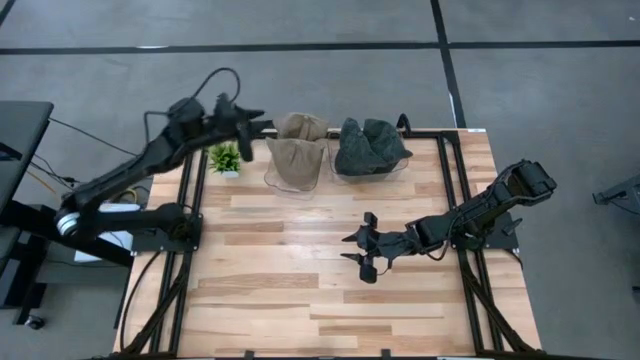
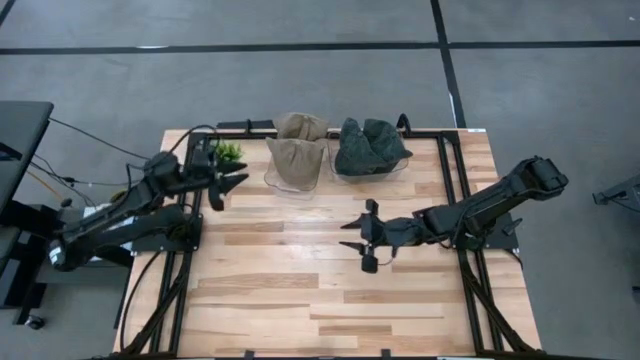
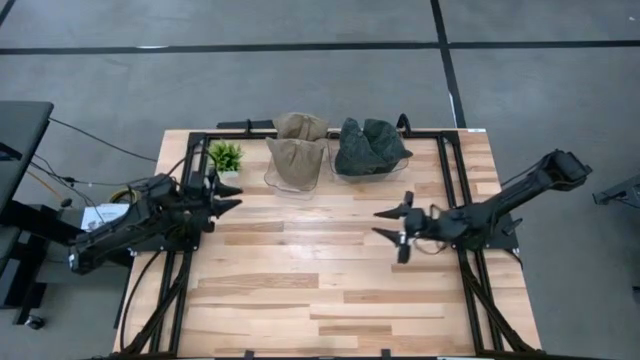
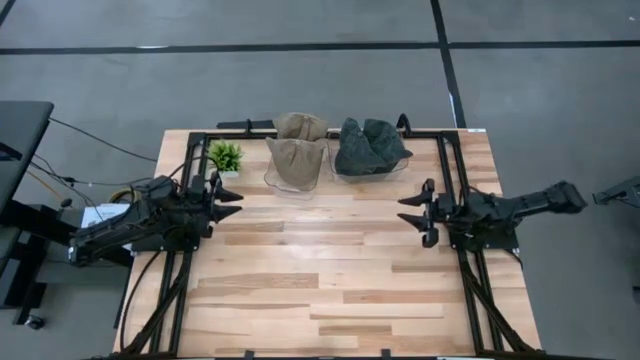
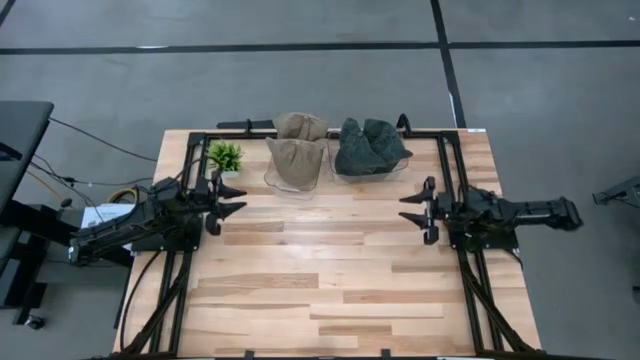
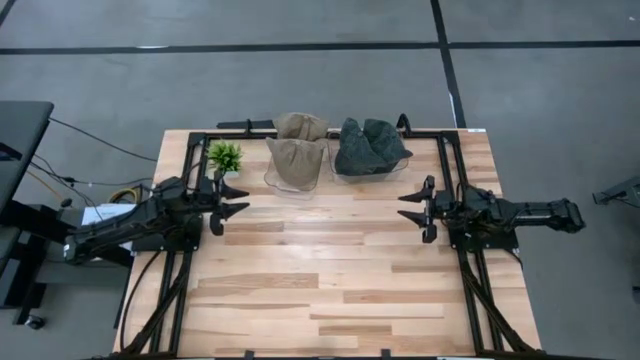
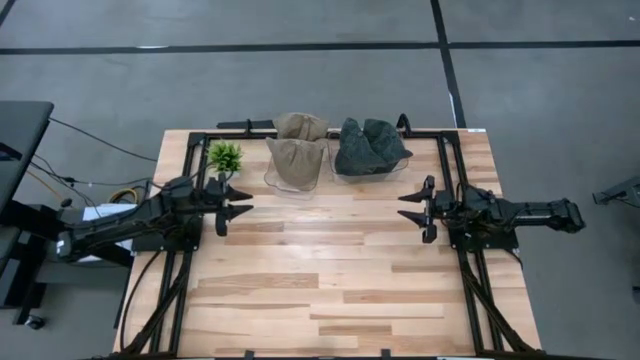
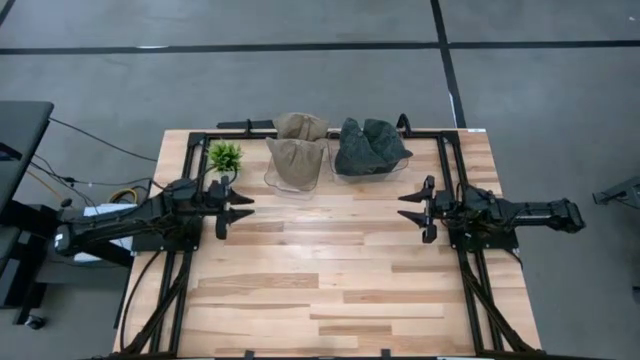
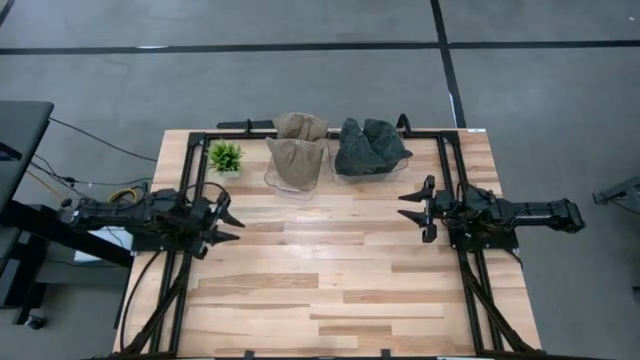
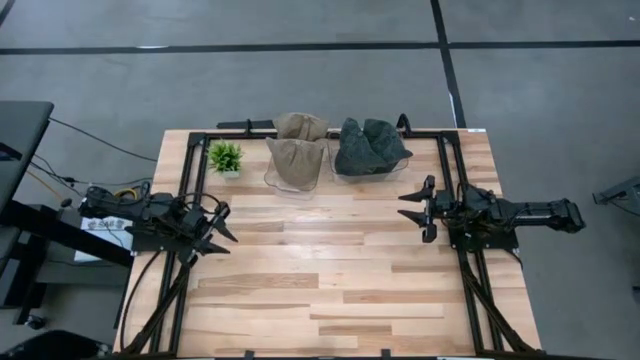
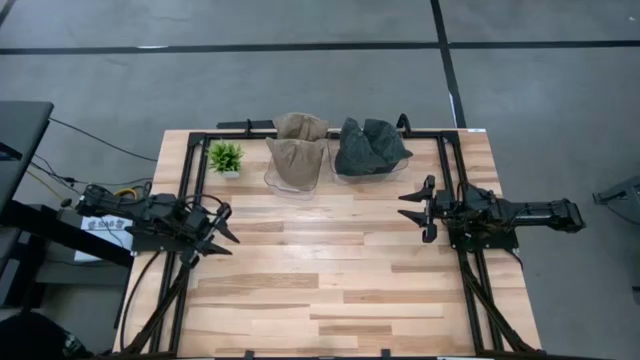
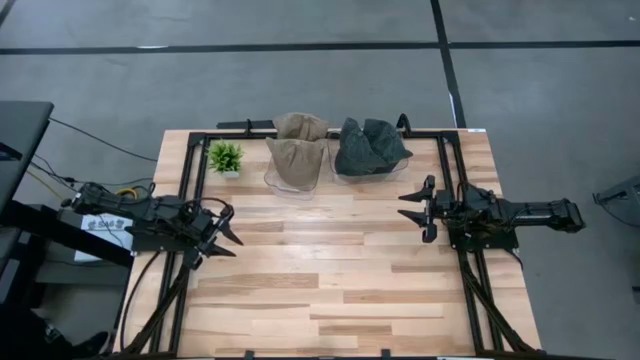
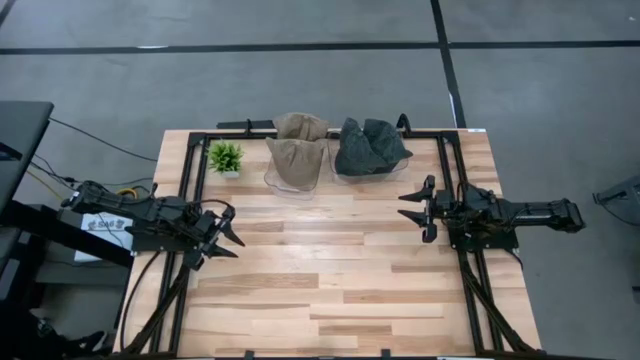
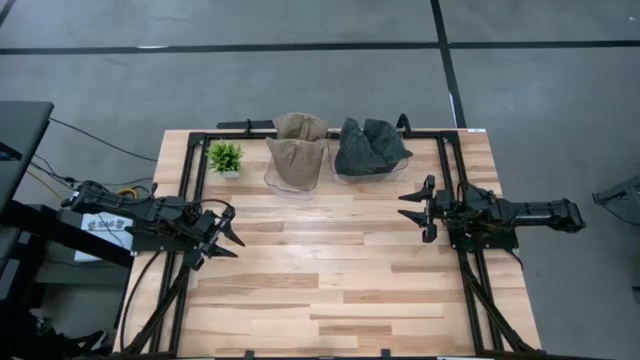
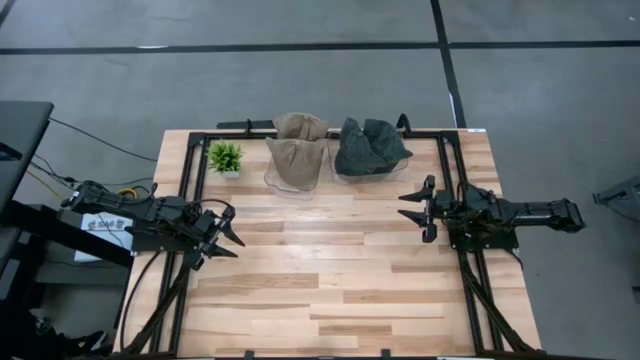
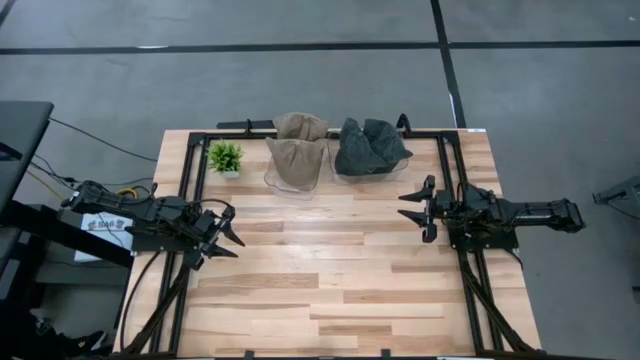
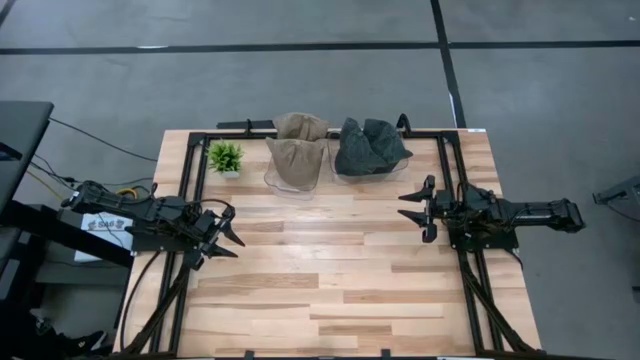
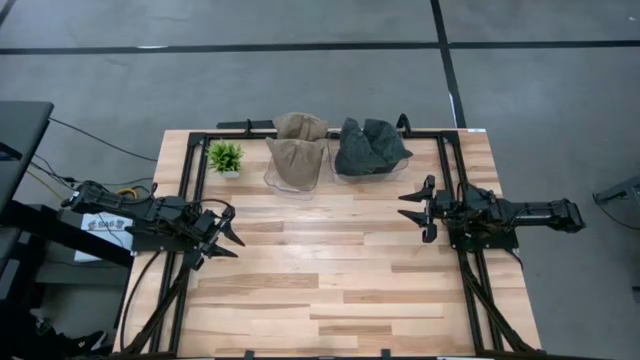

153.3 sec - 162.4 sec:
Task: Pick & Place hat
Return to Home Position

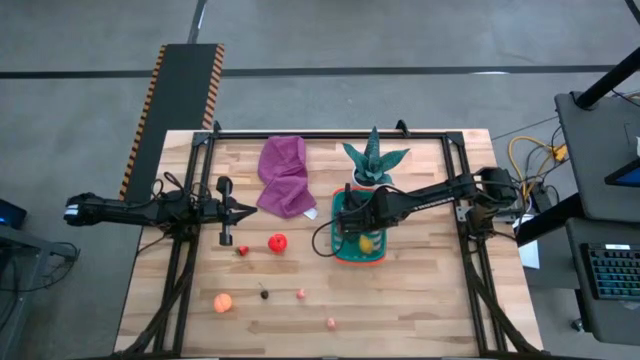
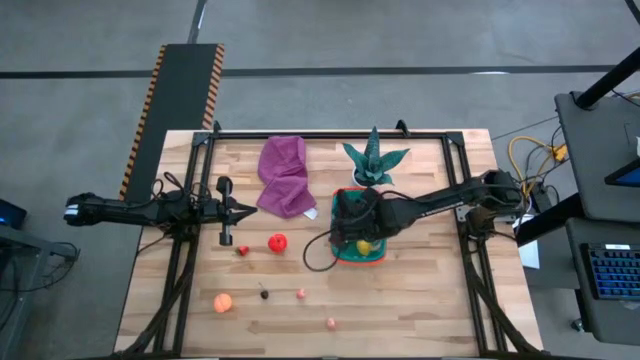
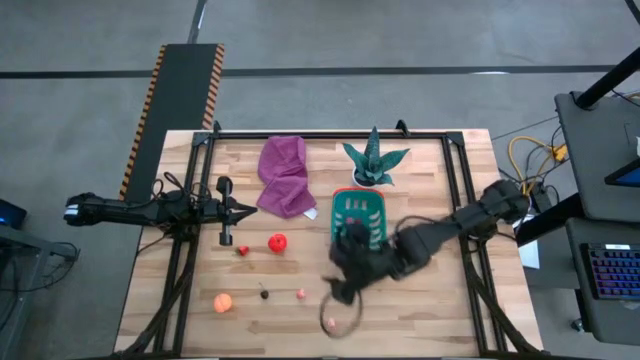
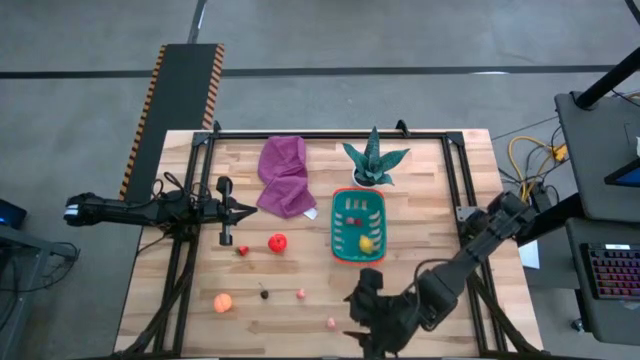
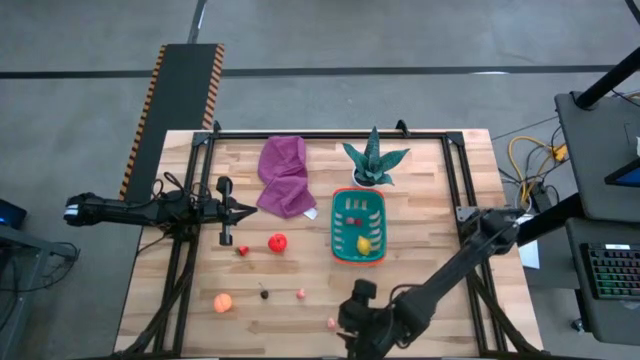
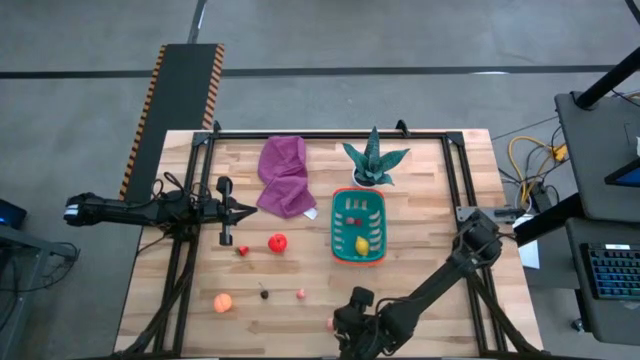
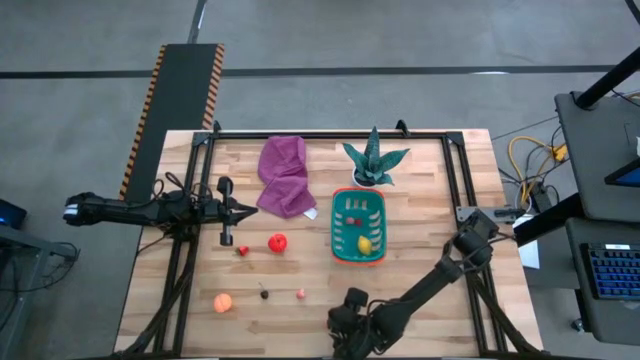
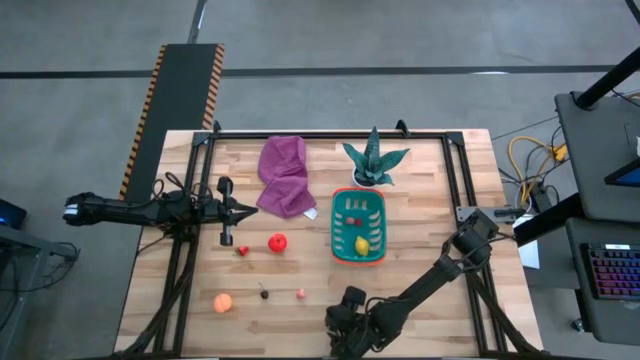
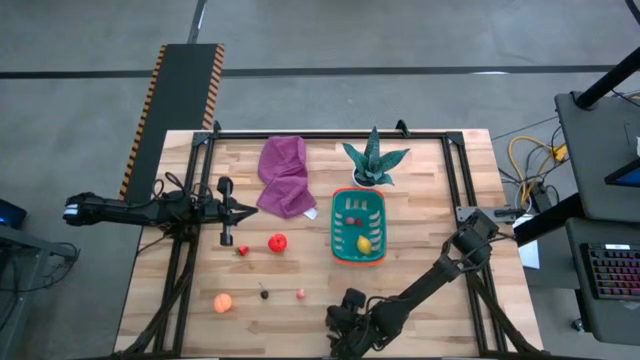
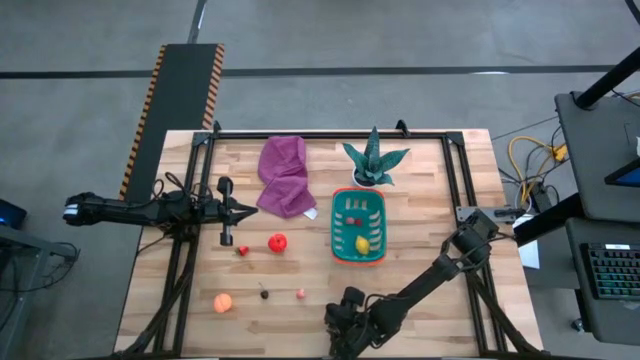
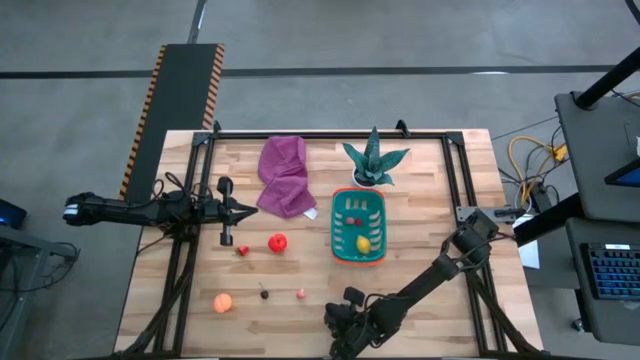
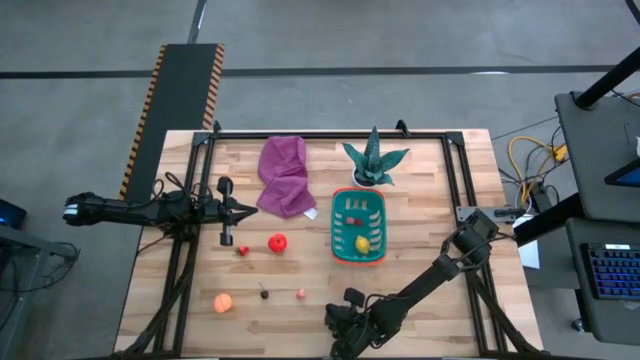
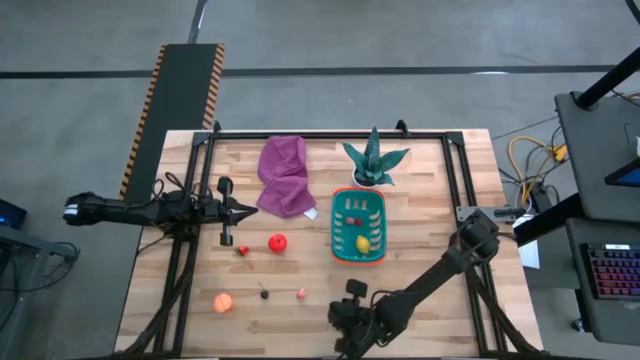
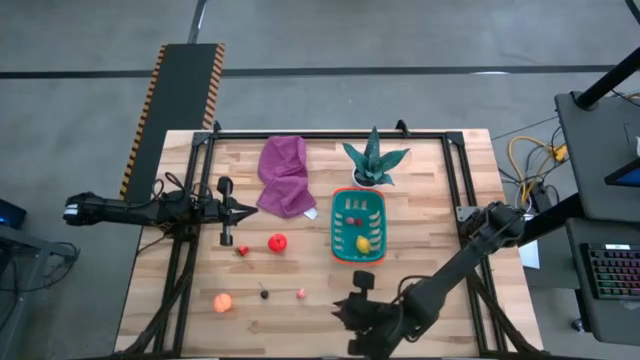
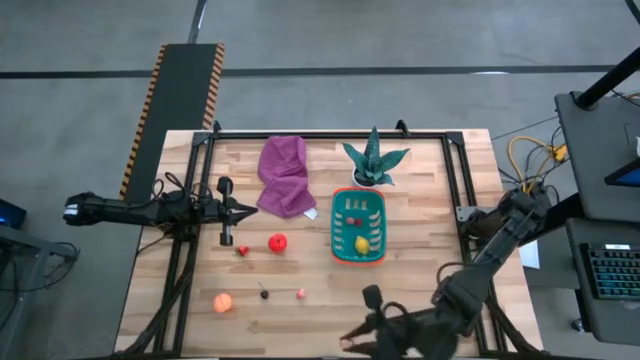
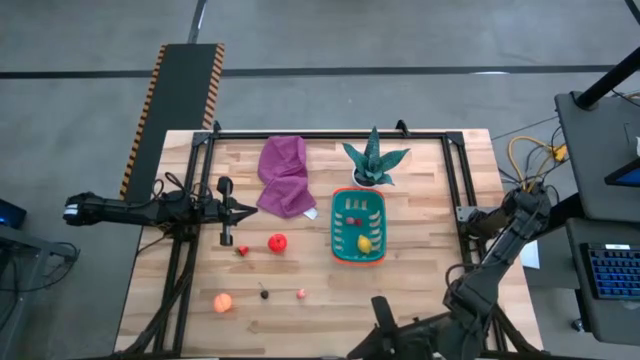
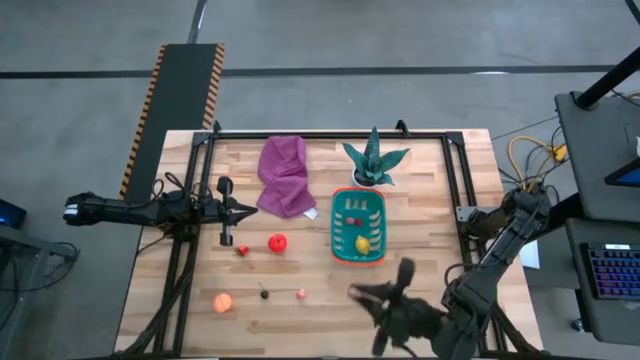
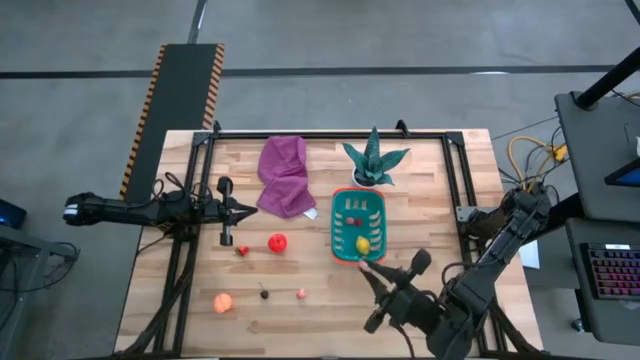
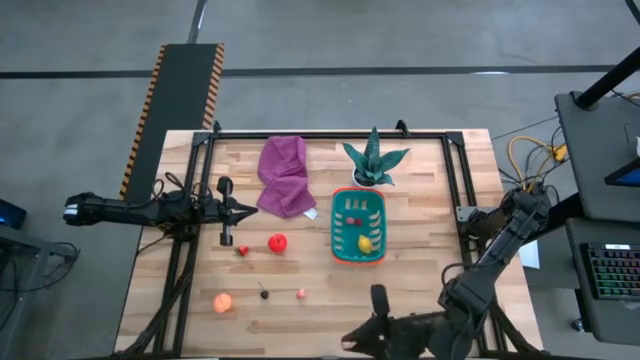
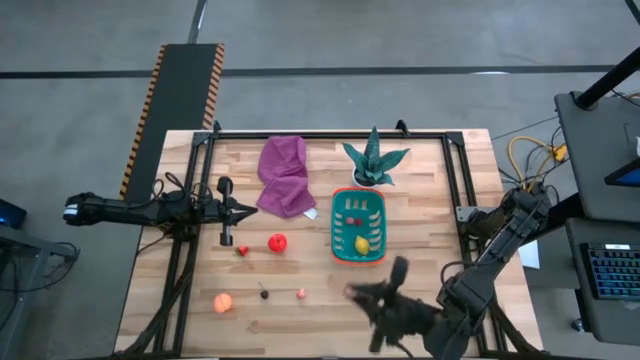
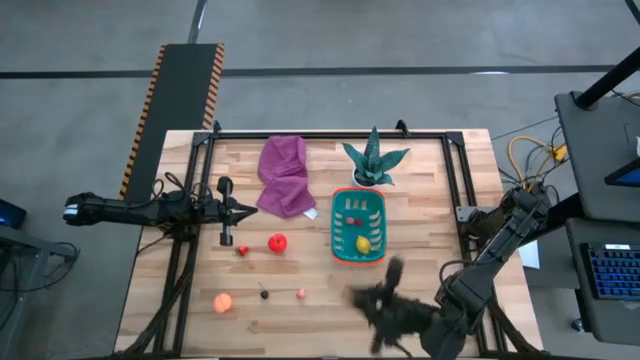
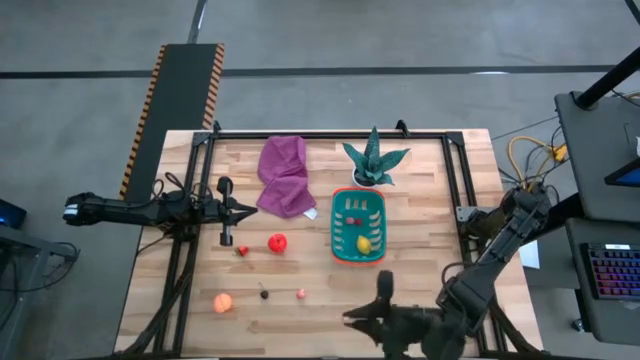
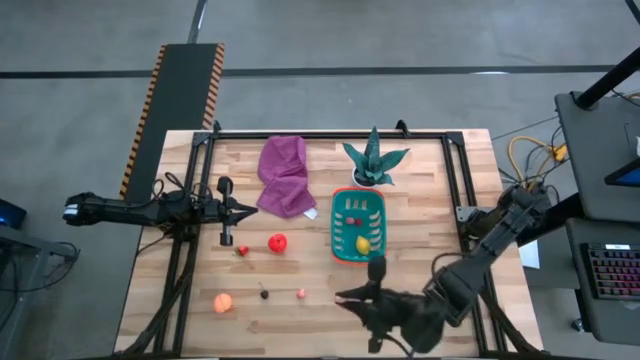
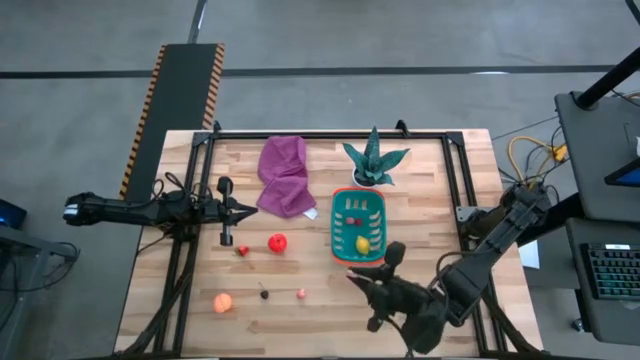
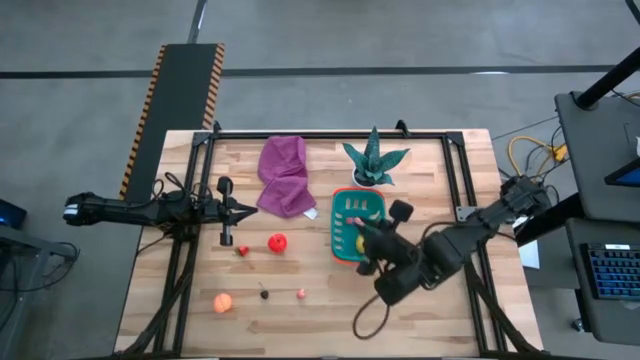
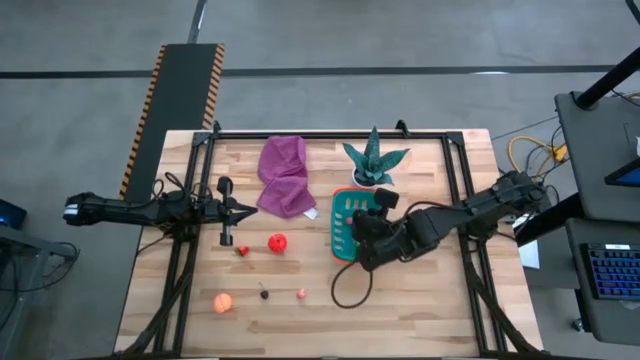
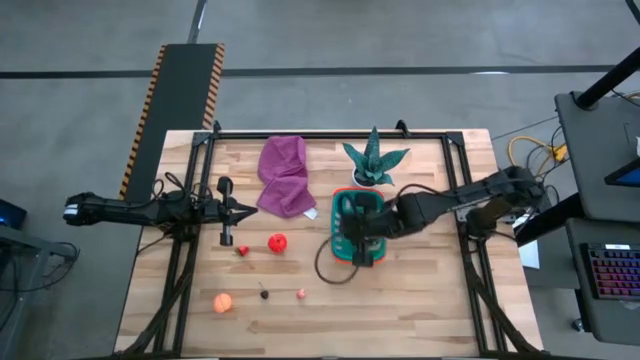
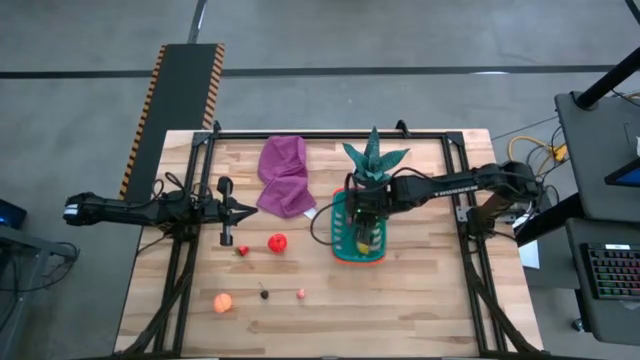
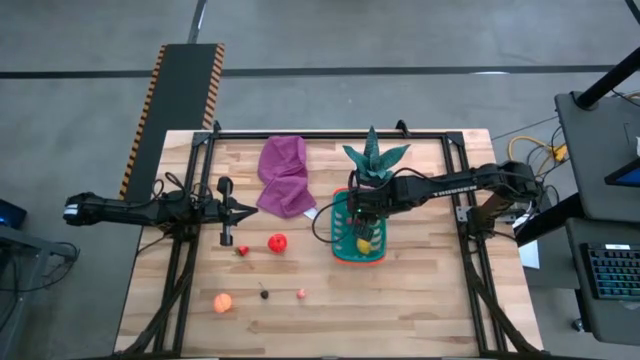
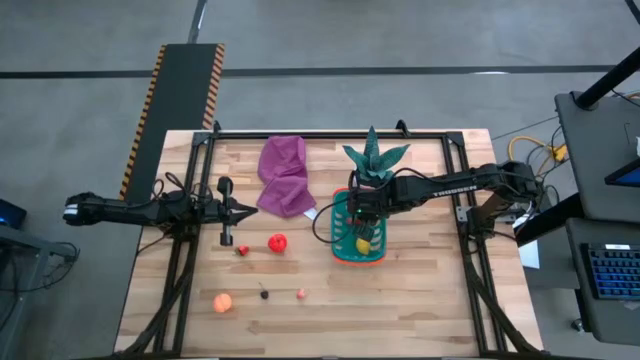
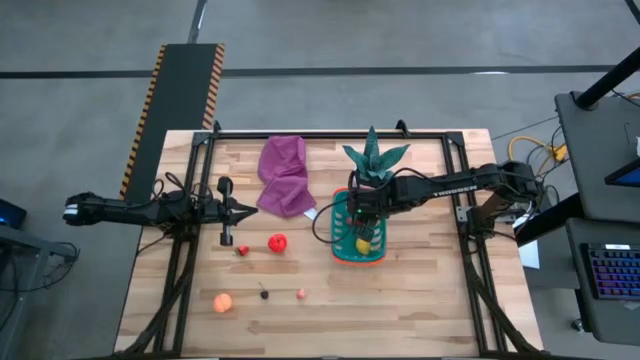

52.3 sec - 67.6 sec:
Task: Pick and placing Produce into tupperware
Put the bottom pink peach into the blue basket
